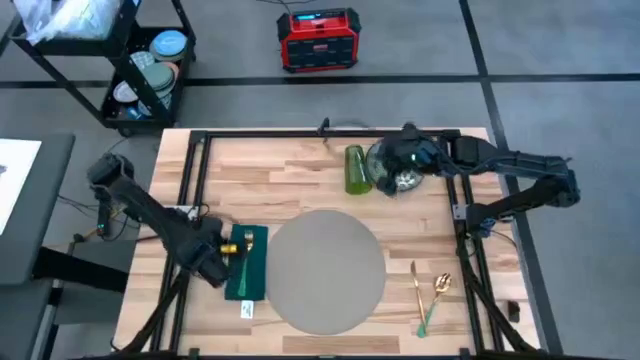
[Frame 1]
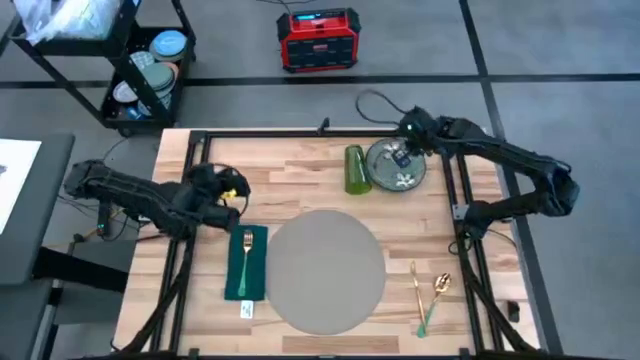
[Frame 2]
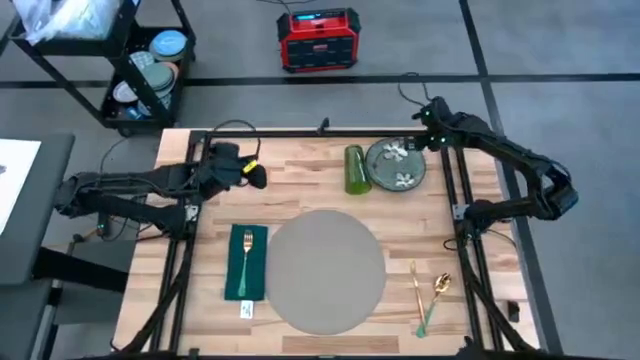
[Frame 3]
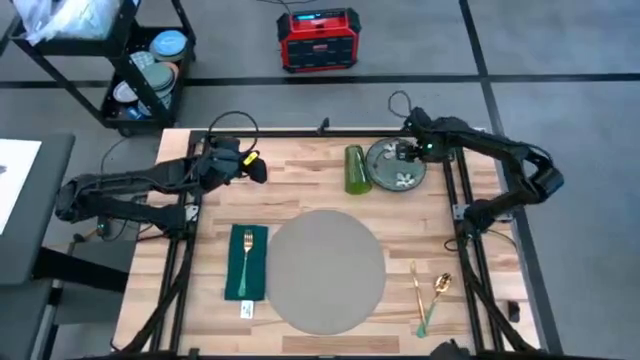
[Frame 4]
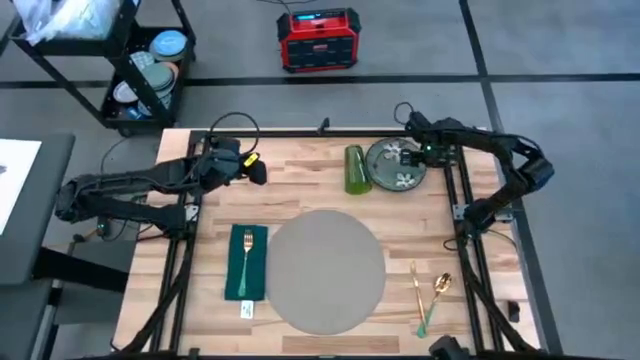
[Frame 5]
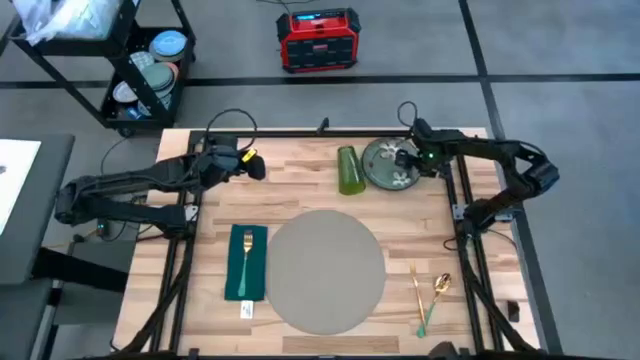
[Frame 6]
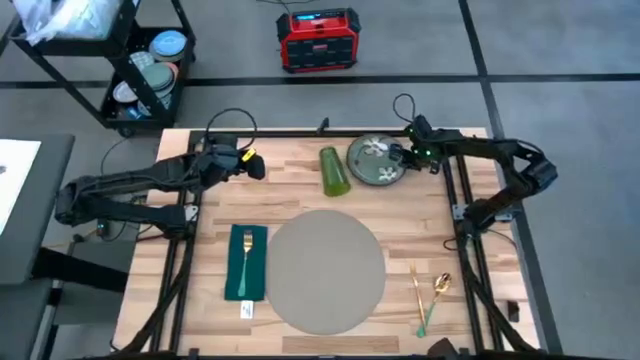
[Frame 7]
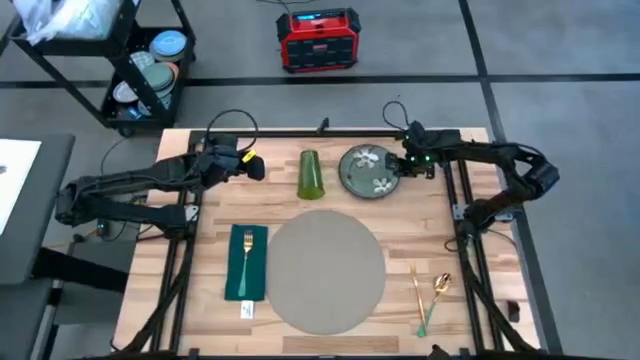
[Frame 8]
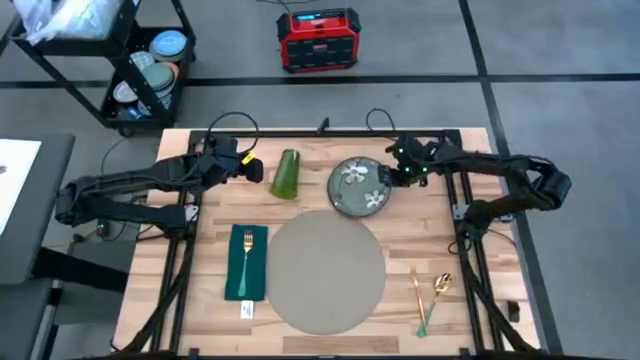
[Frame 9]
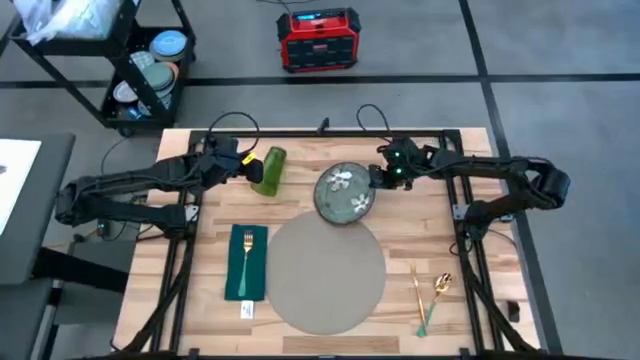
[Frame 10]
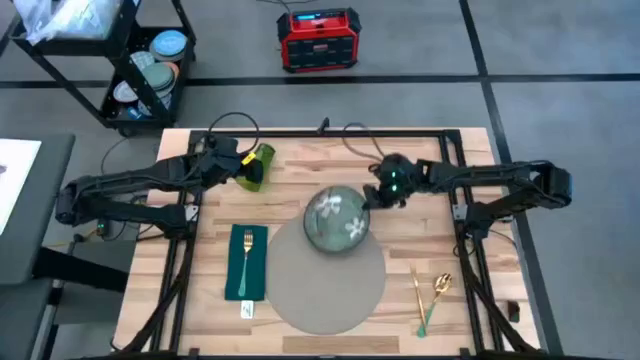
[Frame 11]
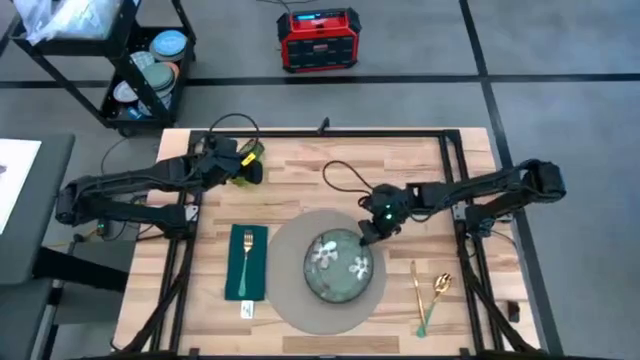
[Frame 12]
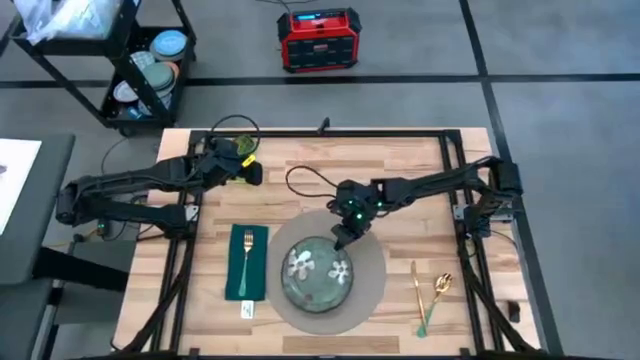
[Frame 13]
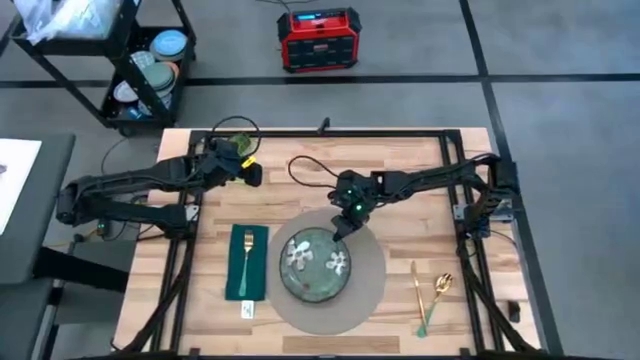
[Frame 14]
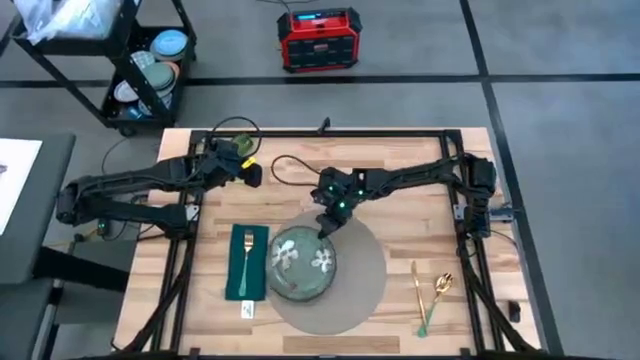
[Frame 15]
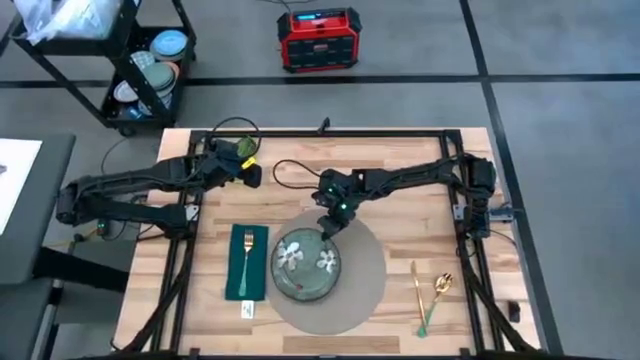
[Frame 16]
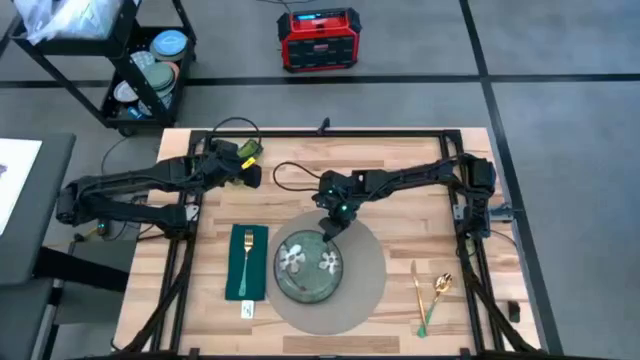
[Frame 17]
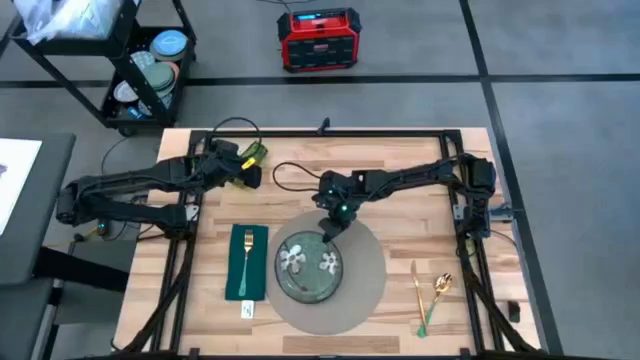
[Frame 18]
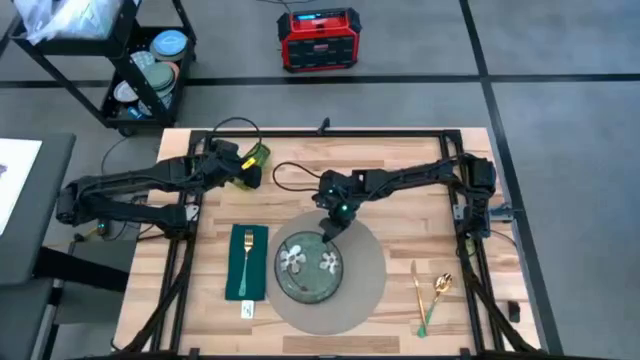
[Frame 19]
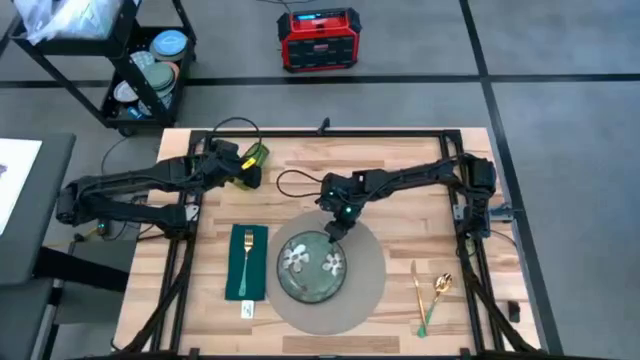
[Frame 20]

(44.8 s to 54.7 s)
Task: Set table place
Put the green plate on the gray tablemat to the right of the green table napkin

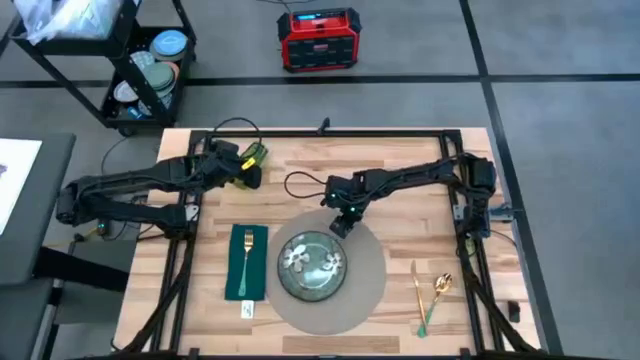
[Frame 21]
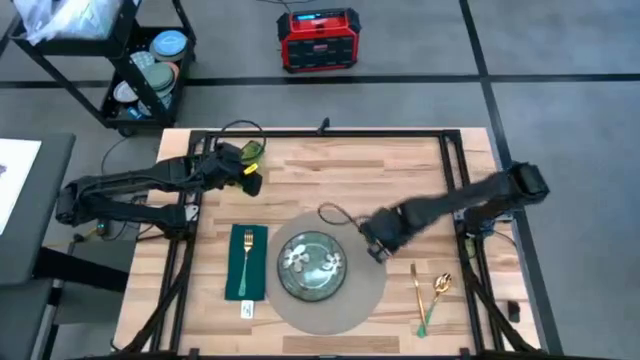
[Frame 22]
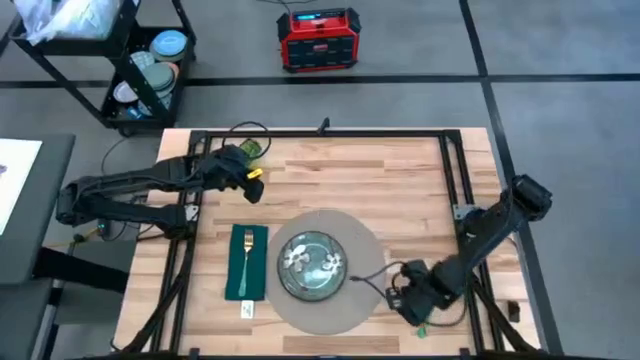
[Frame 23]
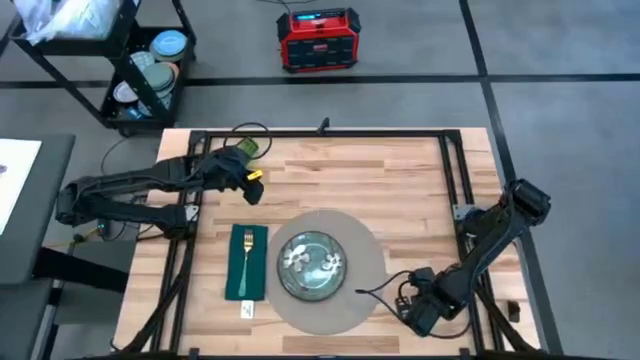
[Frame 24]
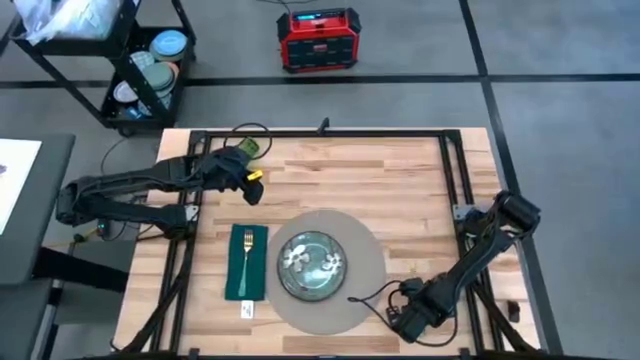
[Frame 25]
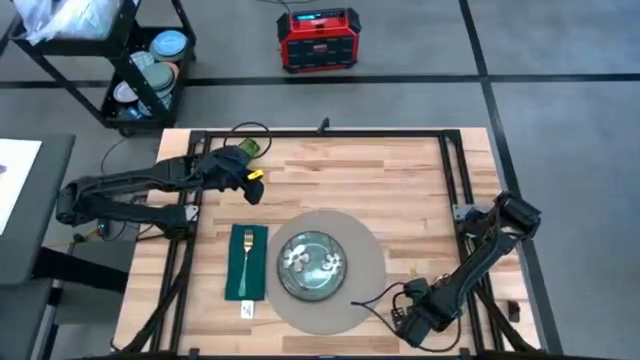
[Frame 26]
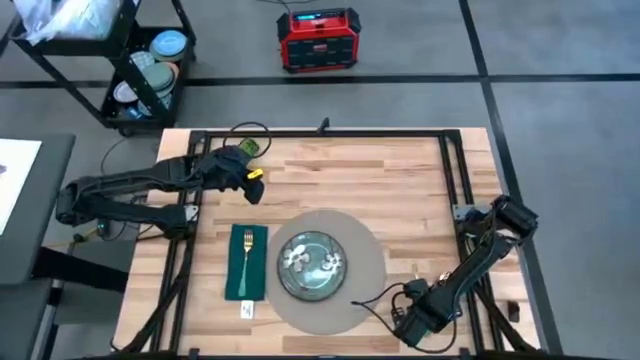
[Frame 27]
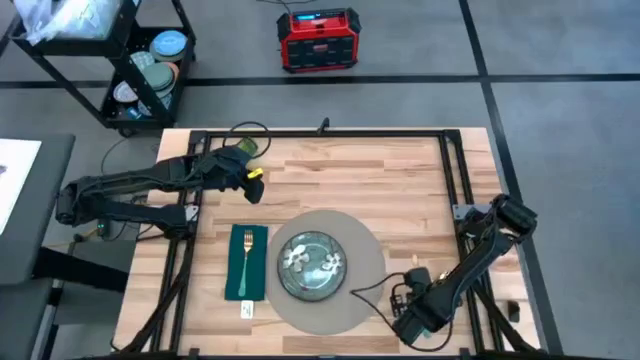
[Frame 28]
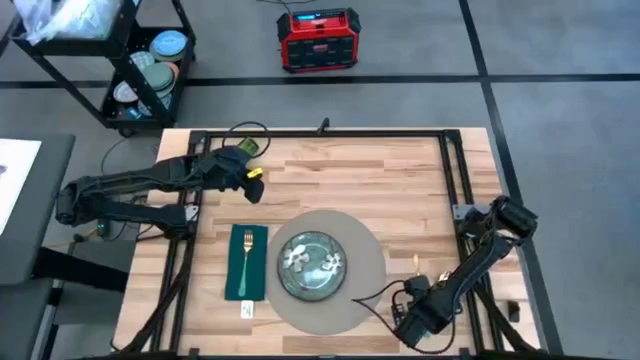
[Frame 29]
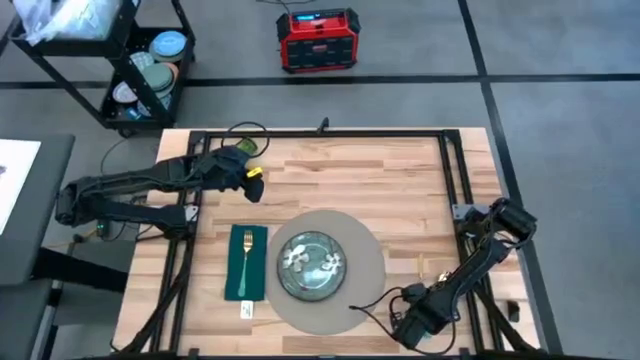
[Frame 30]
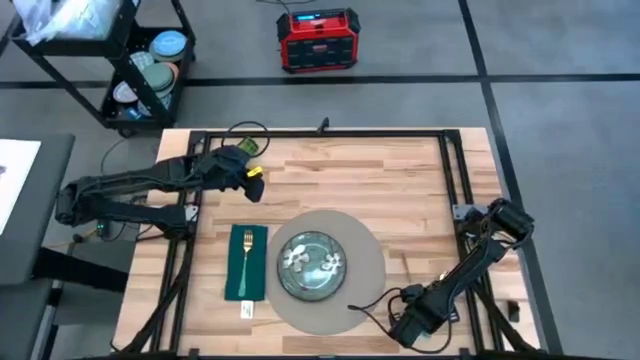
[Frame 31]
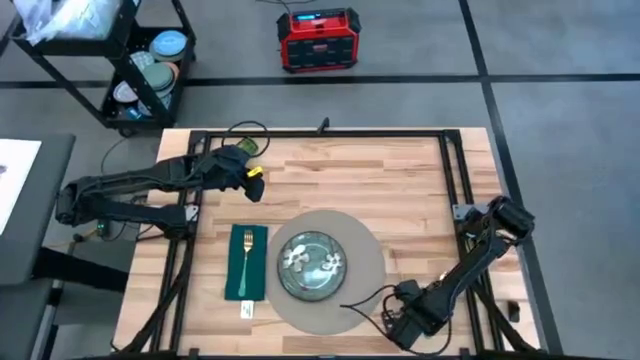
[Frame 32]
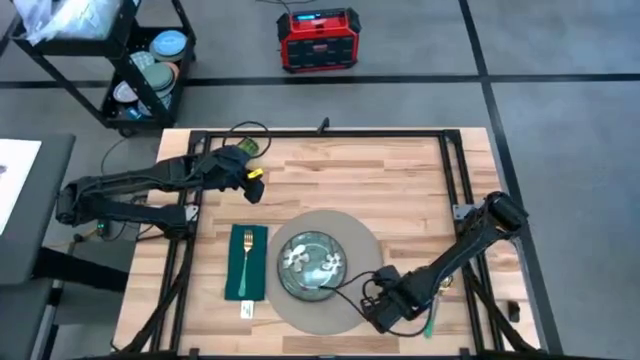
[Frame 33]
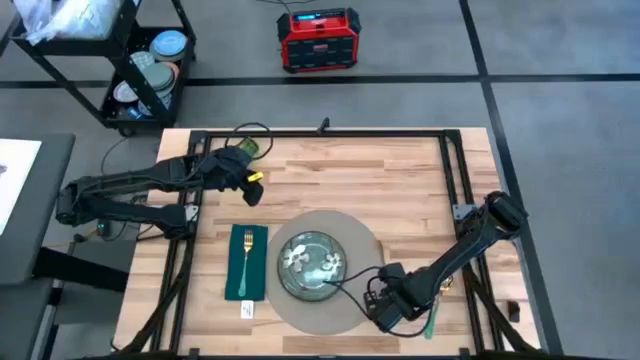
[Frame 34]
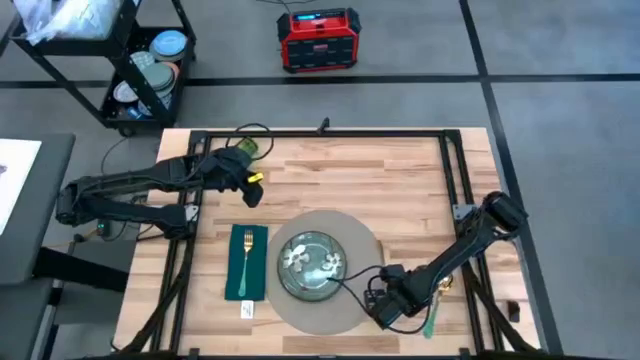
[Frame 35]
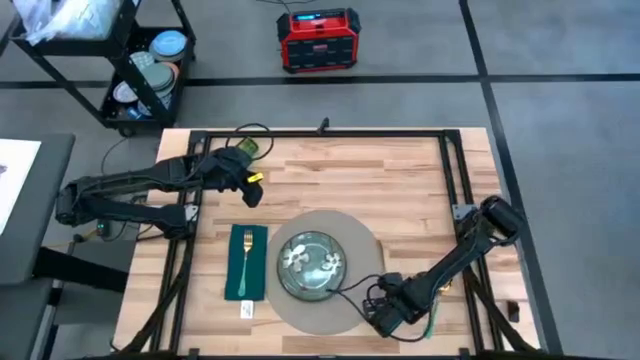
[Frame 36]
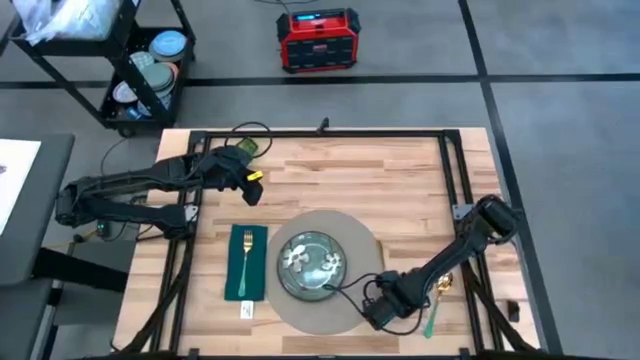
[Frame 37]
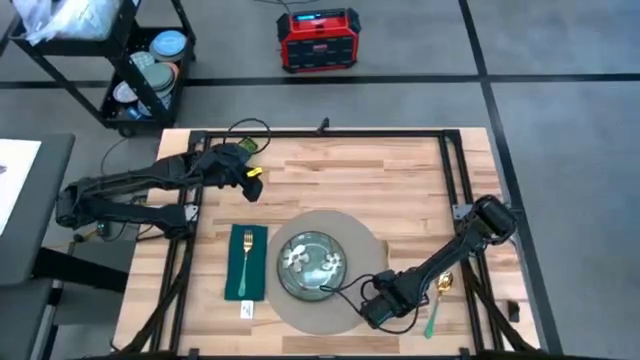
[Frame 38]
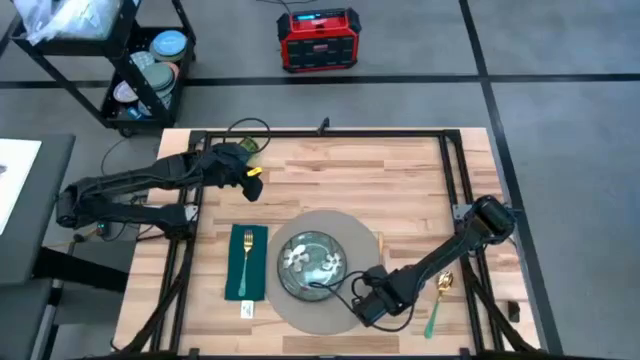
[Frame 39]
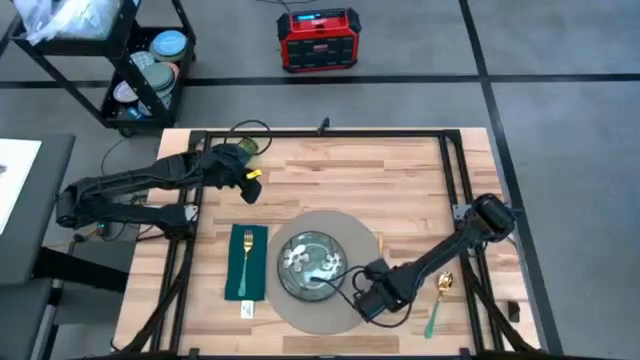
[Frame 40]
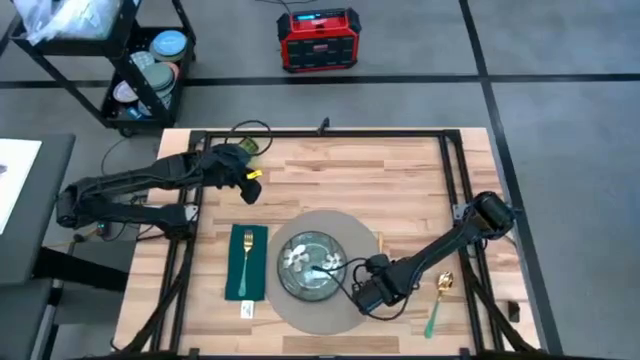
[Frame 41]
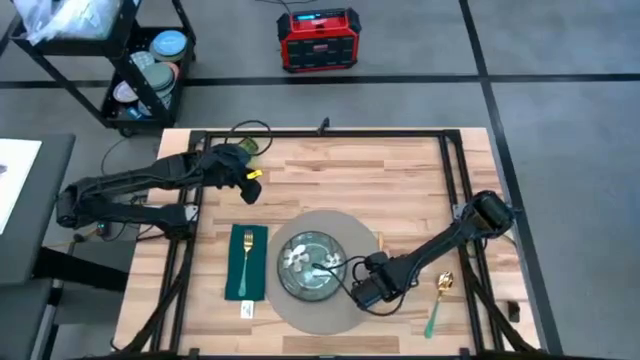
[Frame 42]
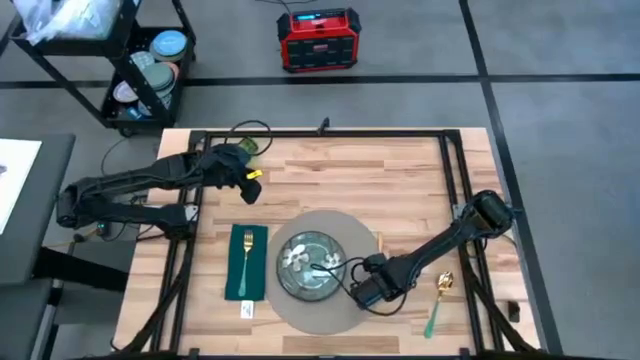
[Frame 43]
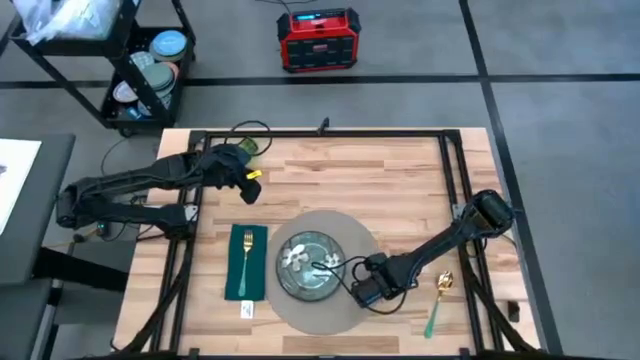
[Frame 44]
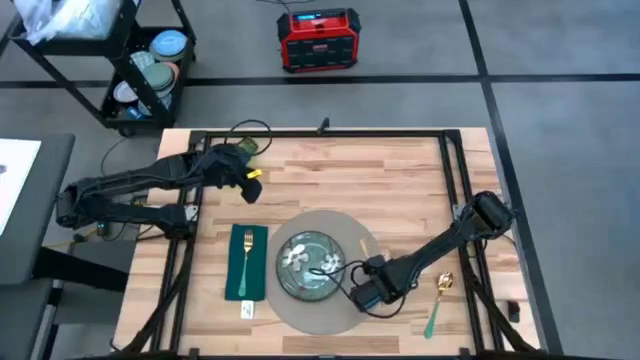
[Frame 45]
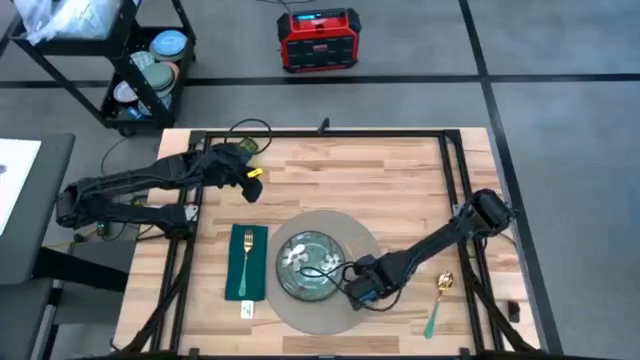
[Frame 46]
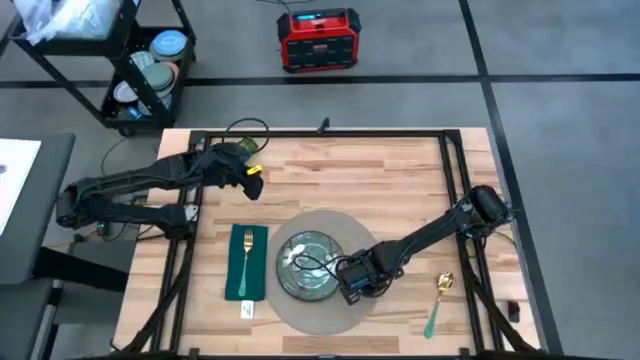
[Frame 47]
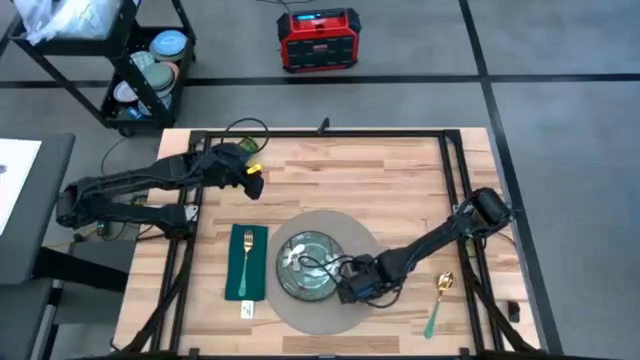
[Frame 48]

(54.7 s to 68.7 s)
Put the gold table knife on the gray tablemat to the right of the green plate
